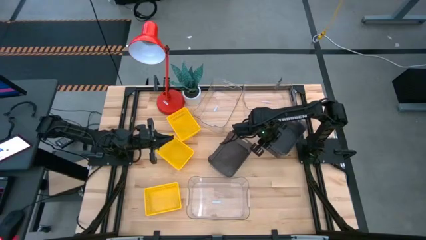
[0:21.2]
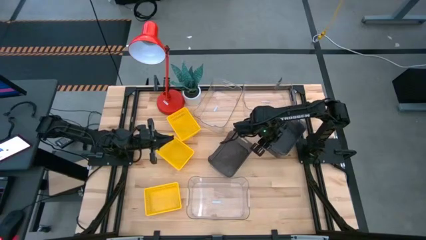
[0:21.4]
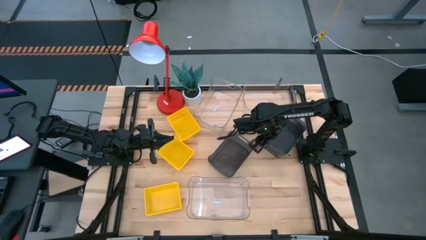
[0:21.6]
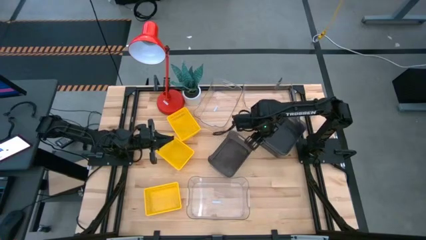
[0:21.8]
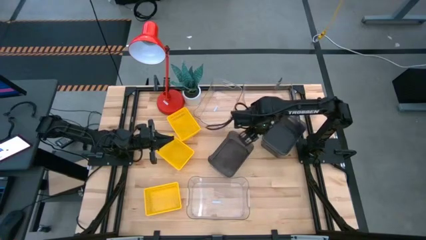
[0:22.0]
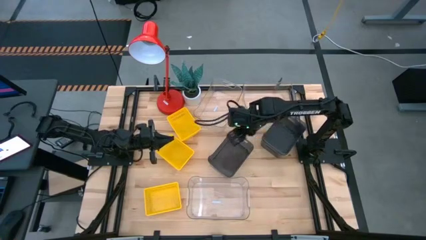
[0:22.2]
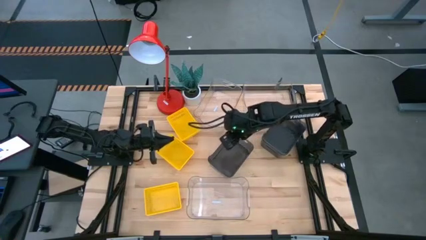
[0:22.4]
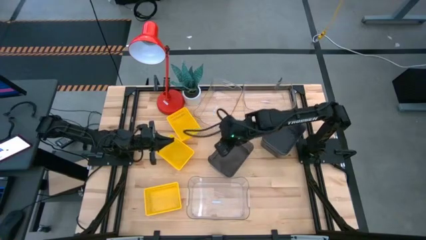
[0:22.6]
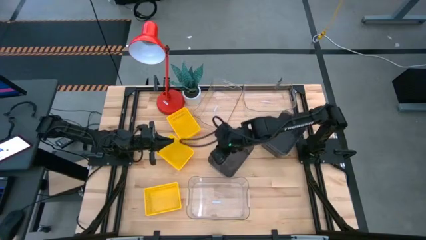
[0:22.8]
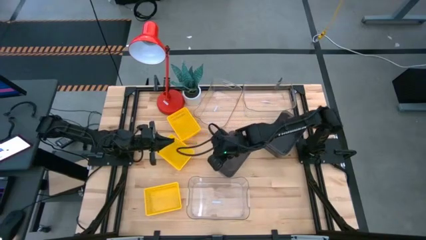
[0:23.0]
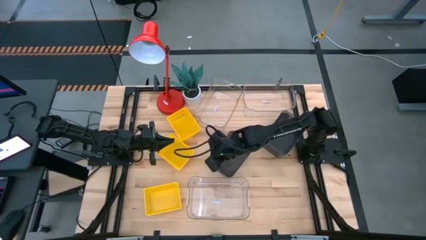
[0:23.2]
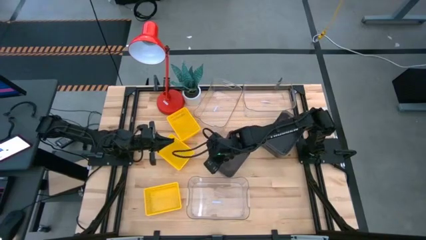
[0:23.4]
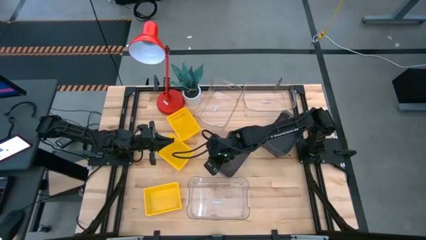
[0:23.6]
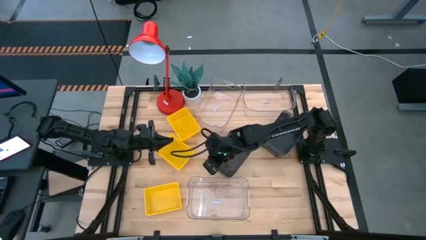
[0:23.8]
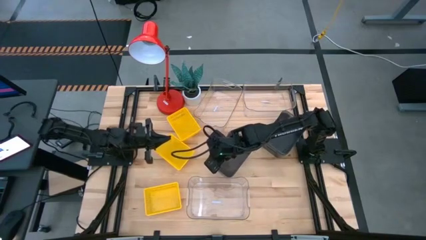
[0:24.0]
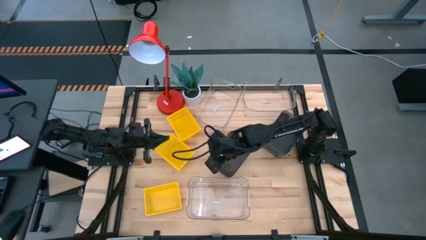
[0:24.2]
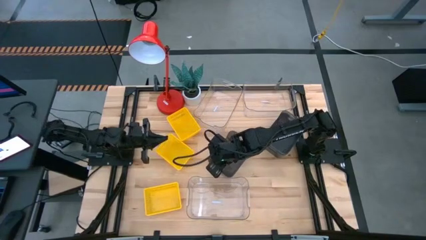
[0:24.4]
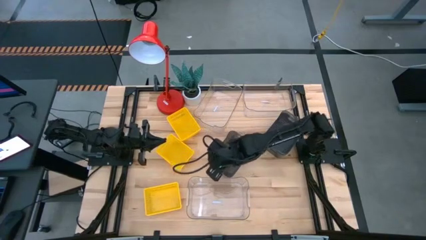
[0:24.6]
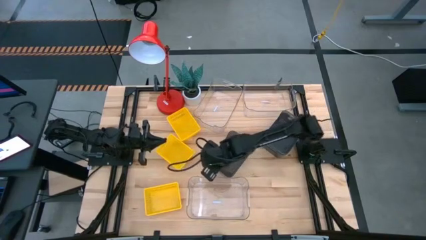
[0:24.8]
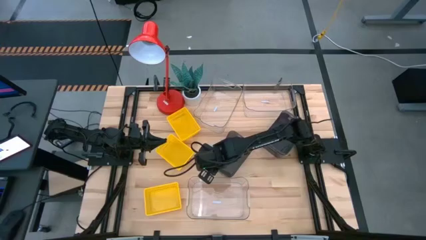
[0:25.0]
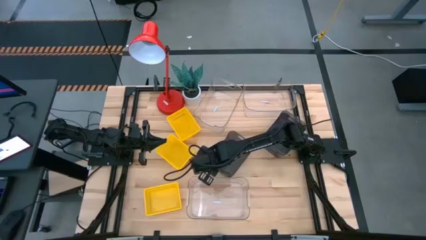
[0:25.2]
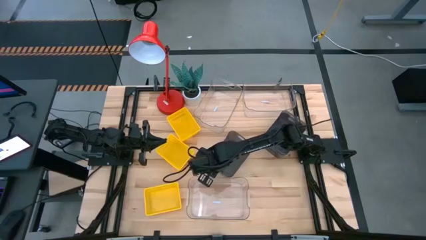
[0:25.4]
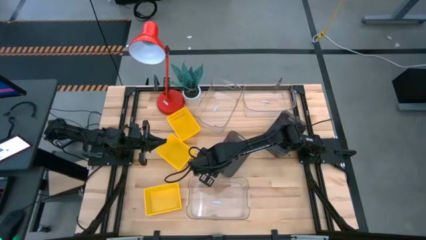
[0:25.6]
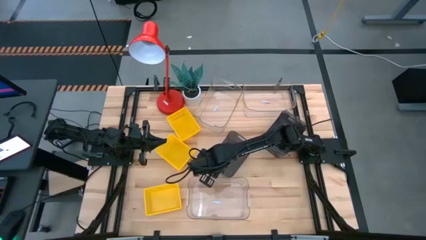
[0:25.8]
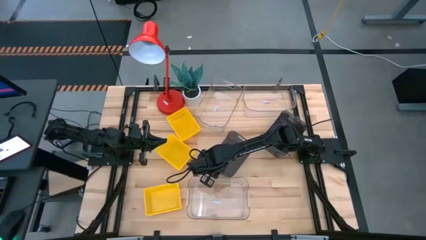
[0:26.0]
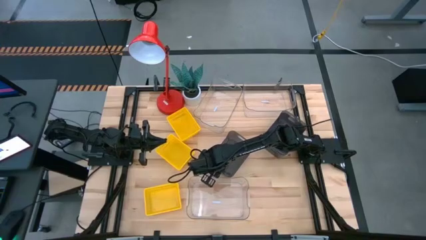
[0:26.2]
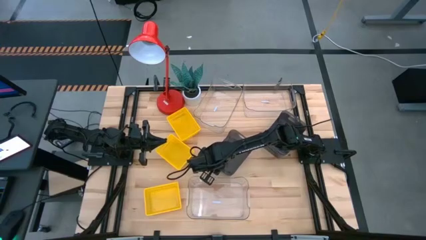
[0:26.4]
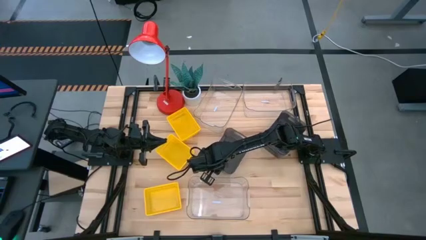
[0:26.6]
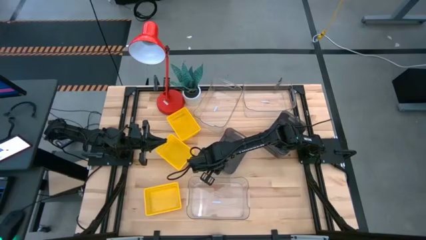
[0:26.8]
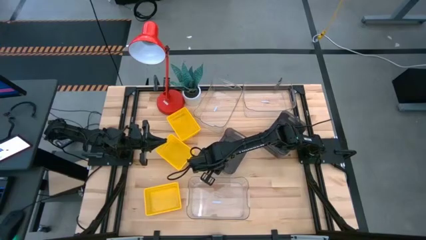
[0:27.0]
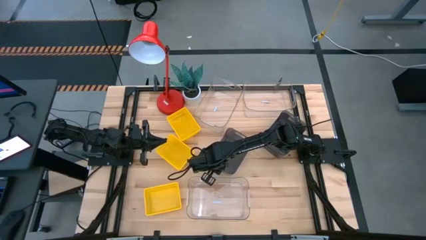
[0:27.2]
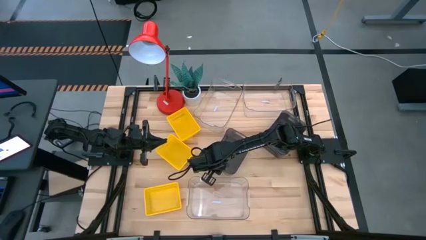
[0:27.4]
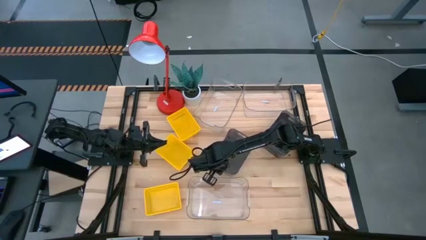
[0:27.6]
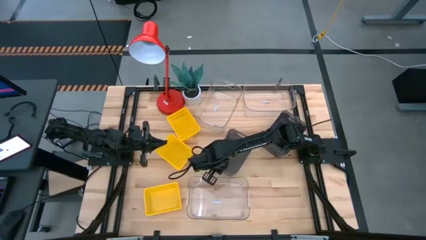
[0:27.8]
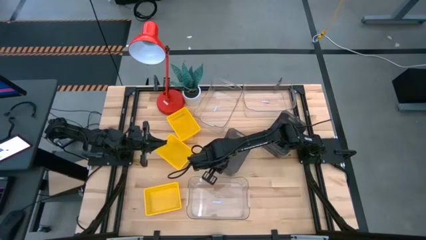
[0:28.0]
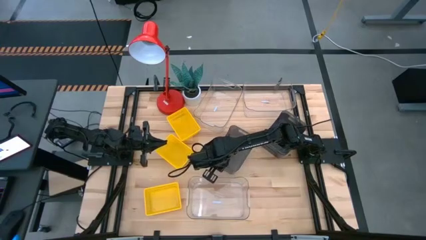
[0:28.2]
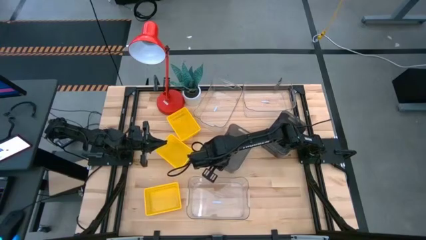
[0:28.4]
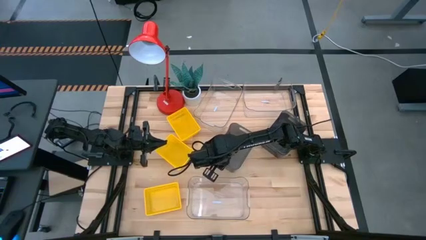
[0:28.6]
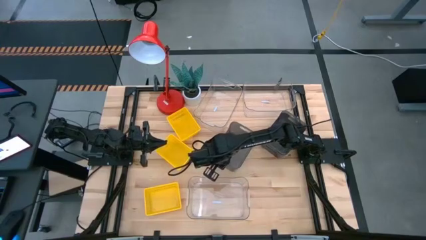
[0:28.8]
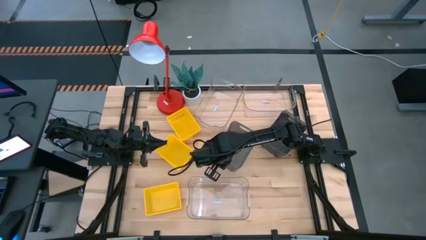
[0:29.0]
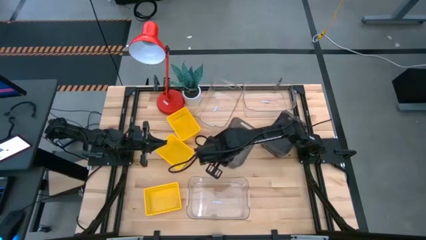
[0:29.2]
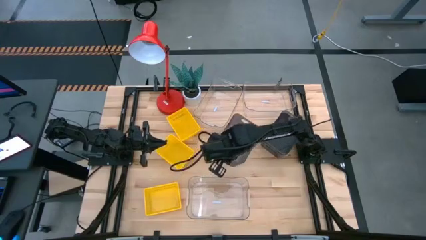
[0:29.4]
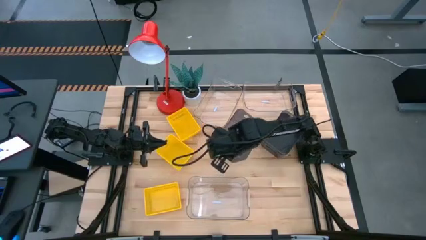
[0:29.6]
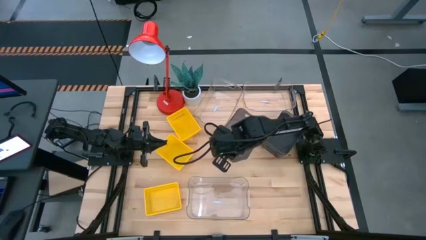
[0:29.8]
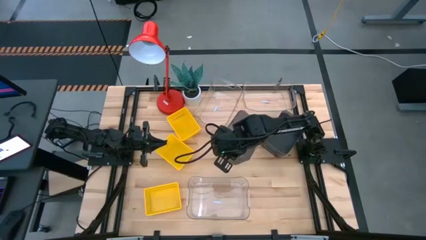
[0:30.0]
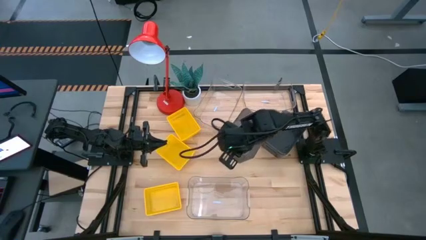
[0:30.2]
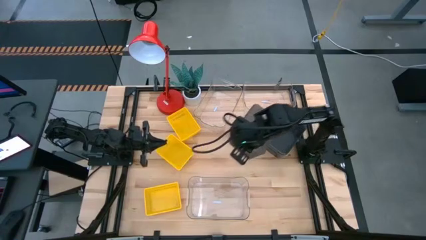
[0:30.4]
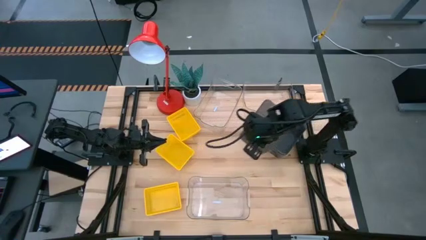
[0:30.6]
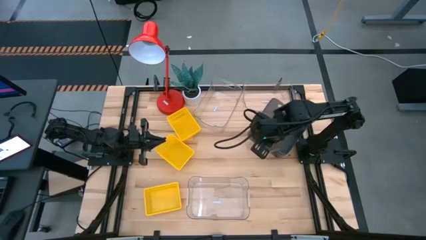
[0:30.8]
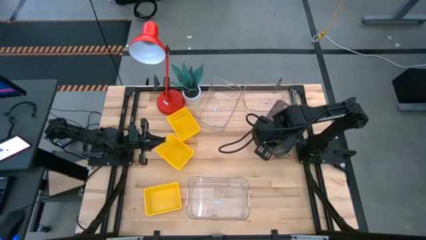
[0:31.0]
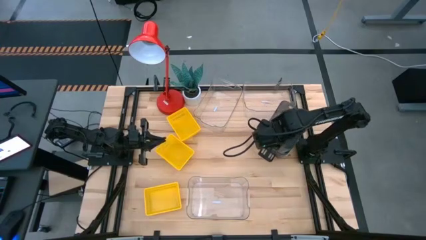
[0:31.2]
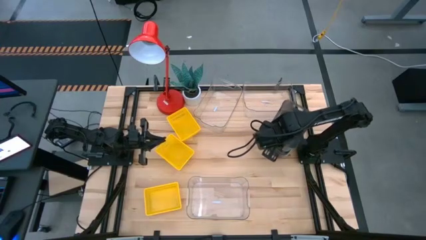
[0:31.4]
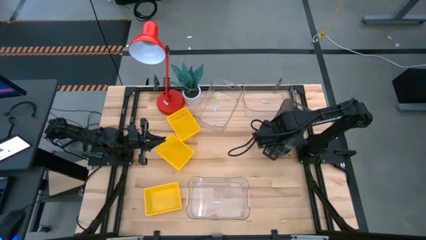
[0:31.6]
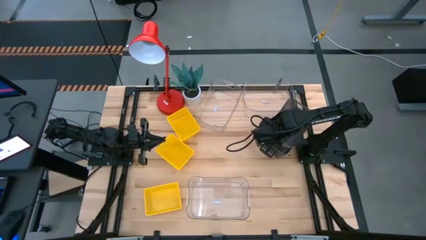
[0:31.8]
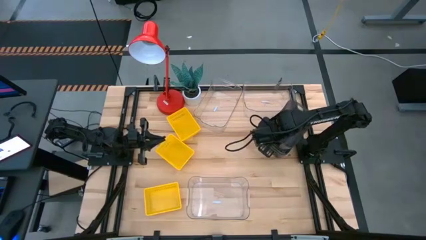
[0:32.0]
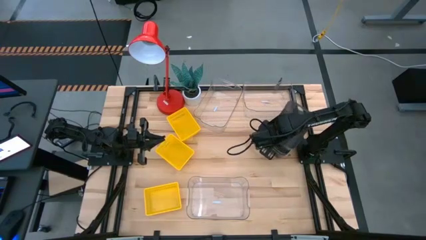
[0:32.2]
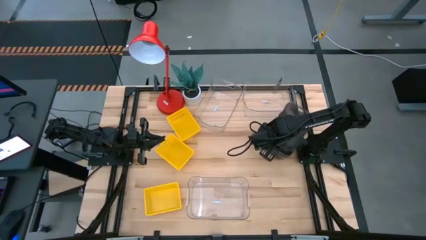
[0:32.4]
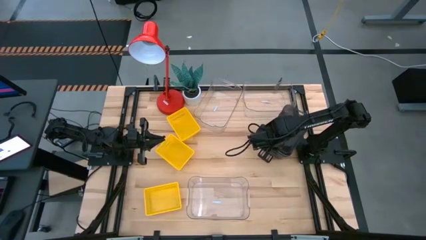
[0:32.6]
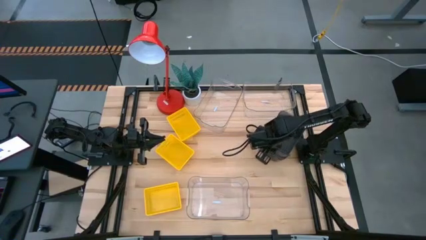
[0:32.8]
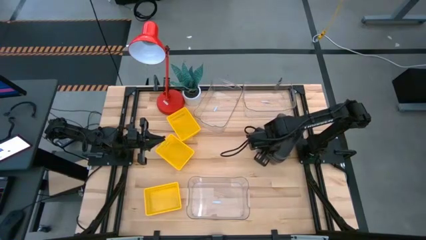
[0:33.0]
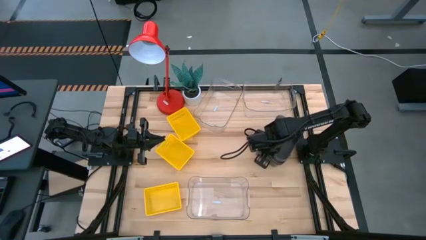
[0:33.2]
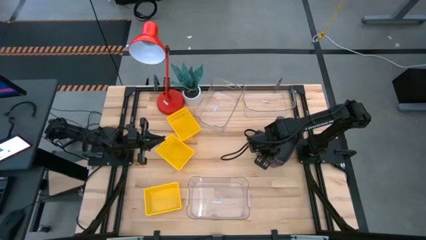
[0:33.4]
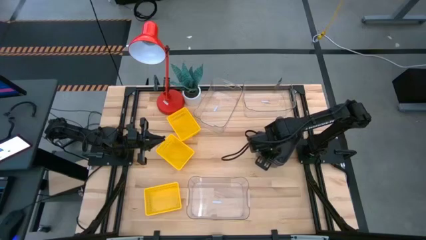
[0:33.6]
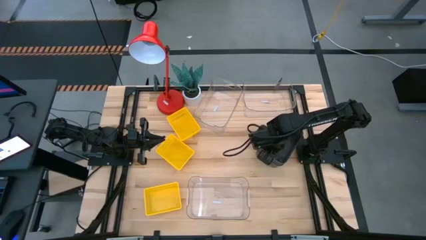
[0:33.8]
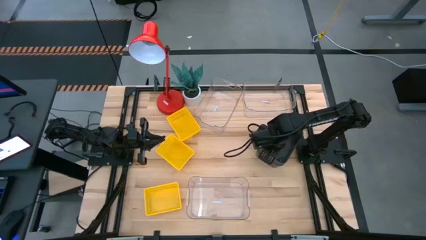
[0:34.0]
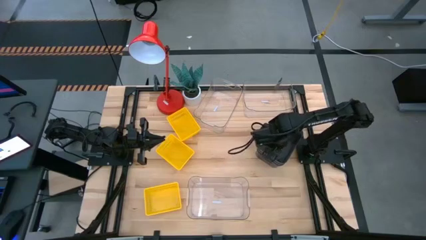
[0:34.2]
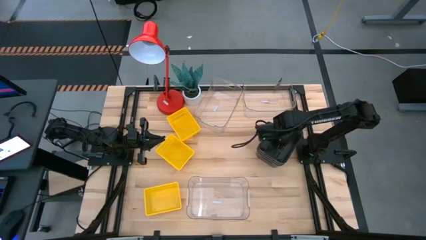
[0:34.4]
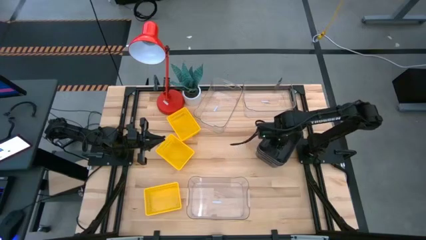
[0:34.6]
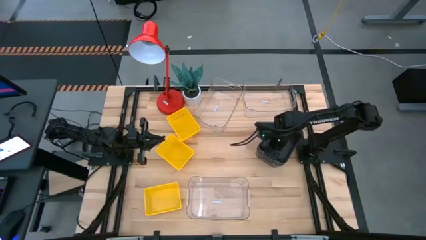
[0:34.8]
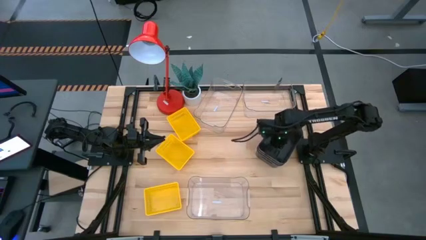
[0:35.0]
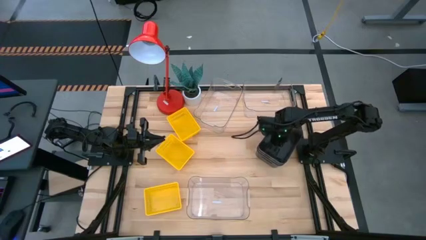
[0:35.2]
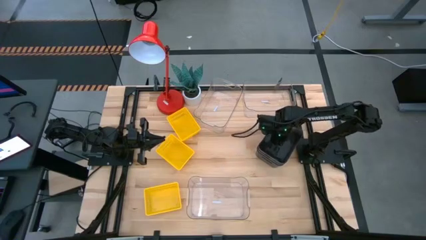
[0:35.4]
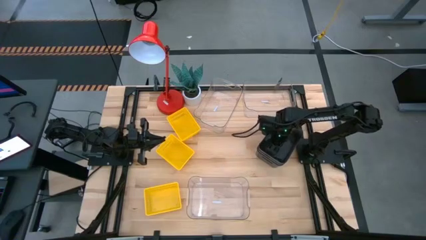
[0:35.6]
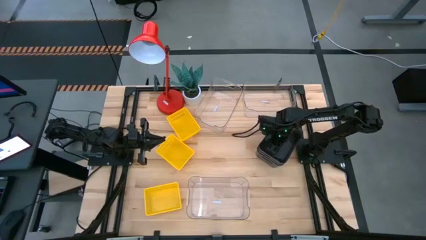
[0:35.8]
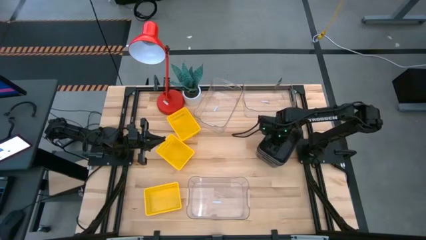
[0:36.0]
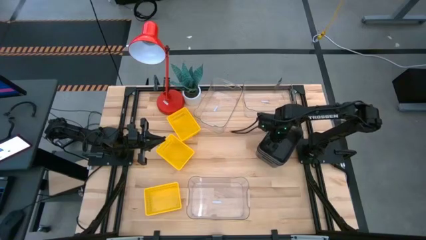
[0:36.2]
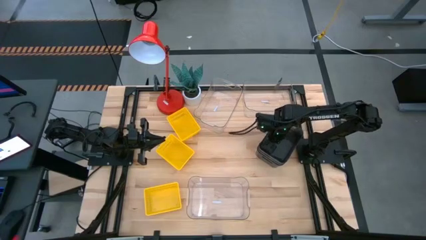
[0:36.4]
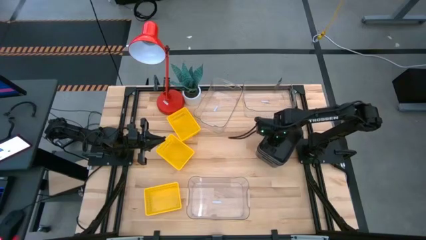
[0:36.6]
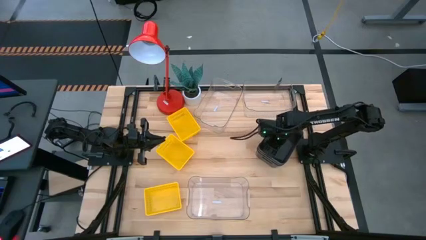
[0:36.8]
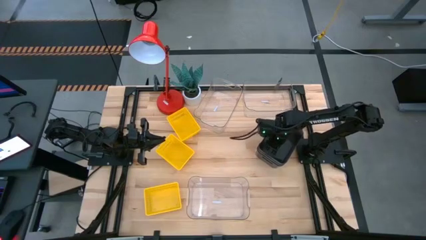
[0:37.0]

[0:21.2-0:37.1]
Stack the left black bin on the stacked black bins
